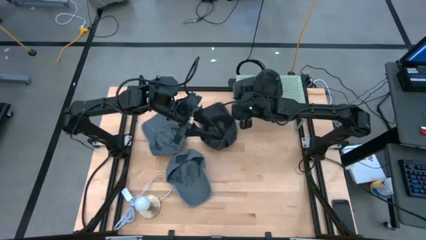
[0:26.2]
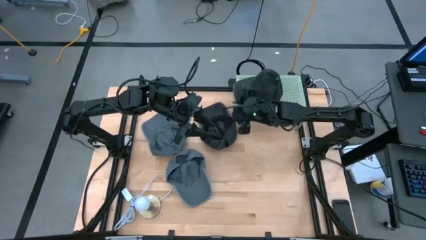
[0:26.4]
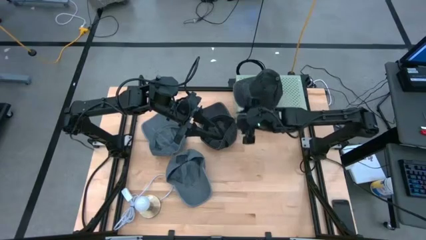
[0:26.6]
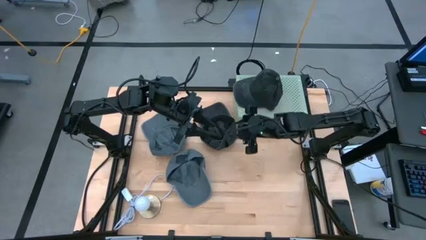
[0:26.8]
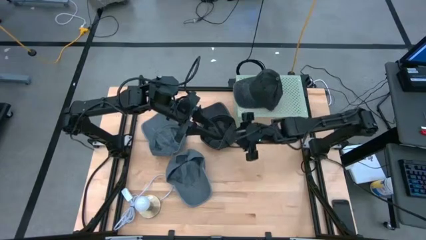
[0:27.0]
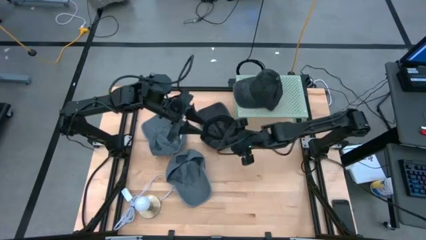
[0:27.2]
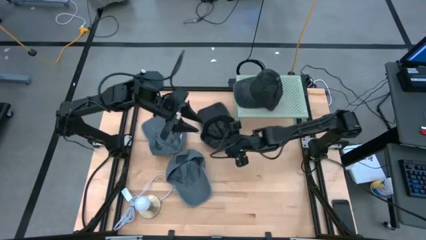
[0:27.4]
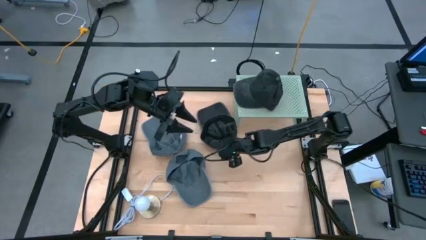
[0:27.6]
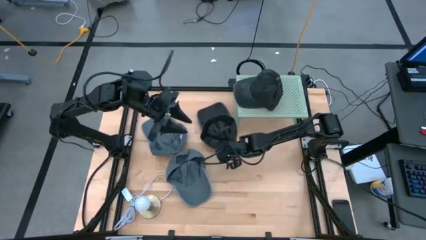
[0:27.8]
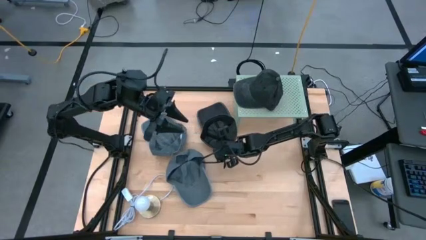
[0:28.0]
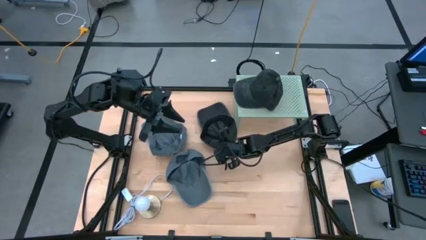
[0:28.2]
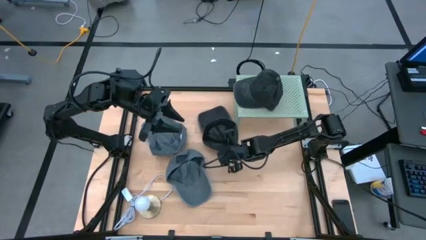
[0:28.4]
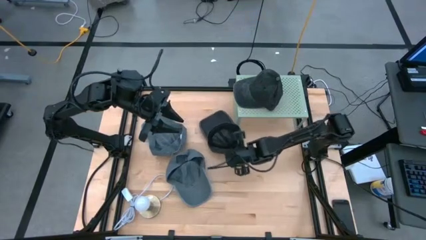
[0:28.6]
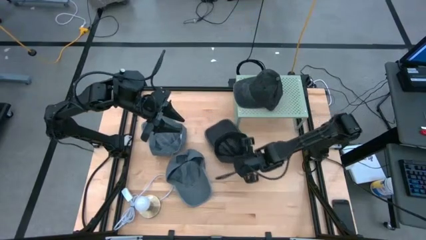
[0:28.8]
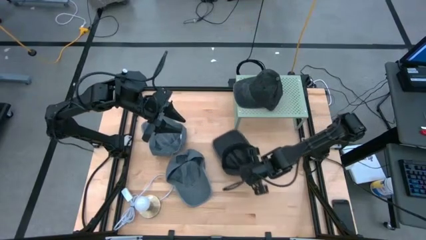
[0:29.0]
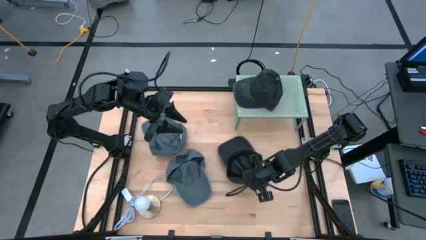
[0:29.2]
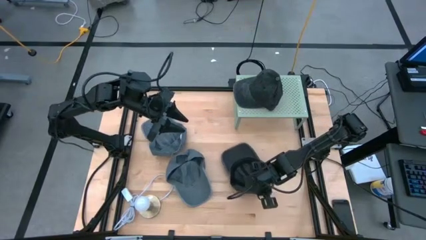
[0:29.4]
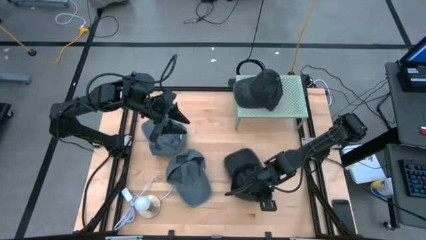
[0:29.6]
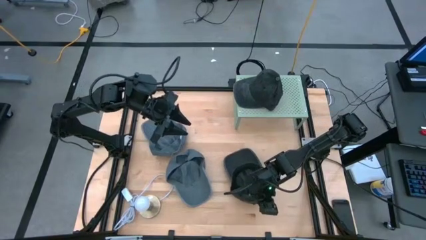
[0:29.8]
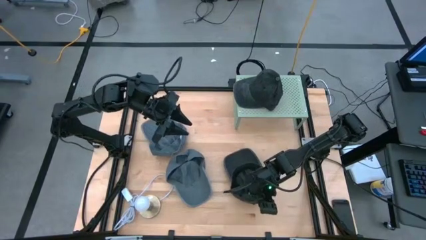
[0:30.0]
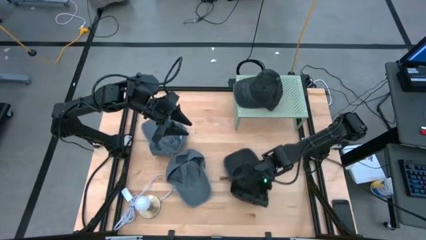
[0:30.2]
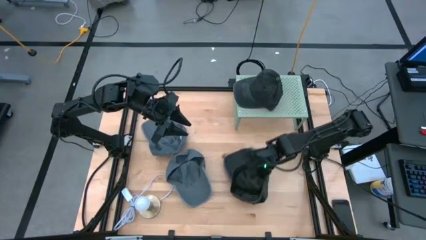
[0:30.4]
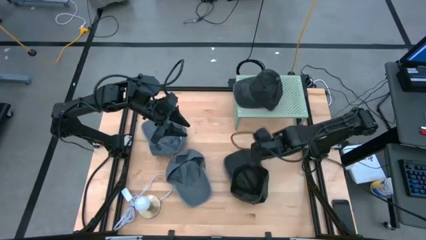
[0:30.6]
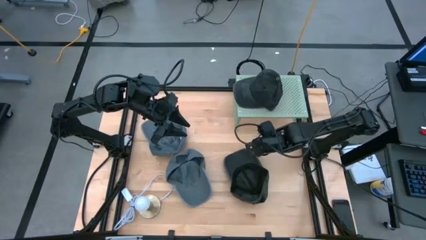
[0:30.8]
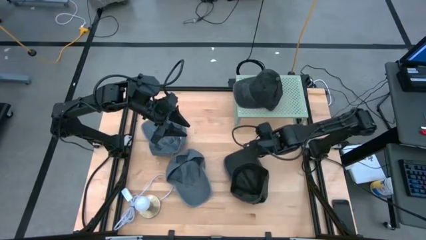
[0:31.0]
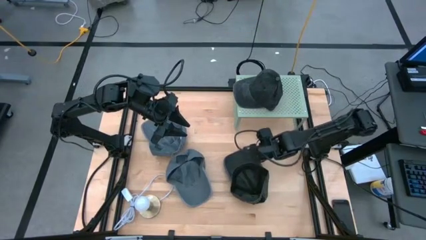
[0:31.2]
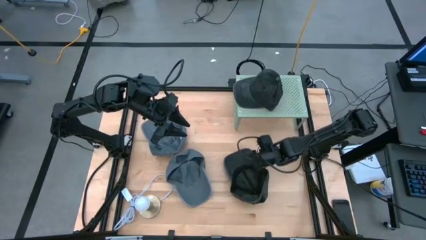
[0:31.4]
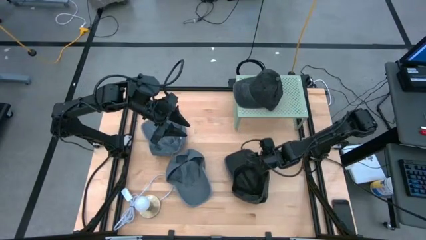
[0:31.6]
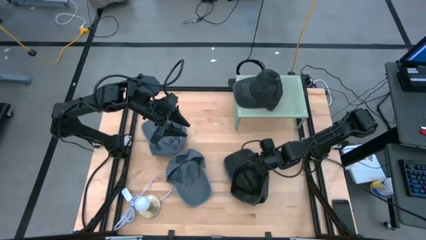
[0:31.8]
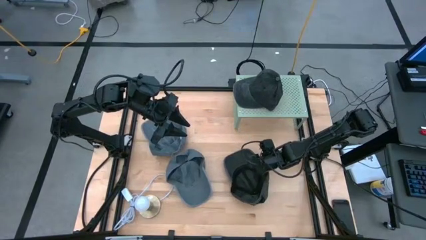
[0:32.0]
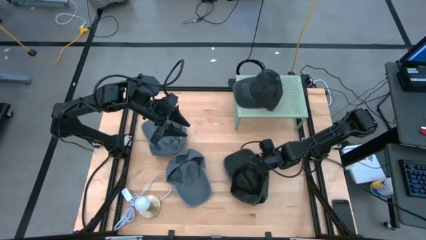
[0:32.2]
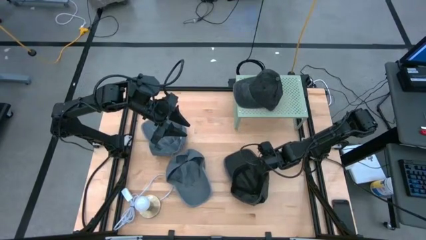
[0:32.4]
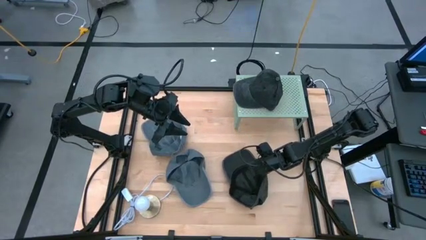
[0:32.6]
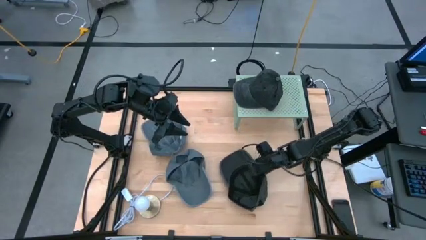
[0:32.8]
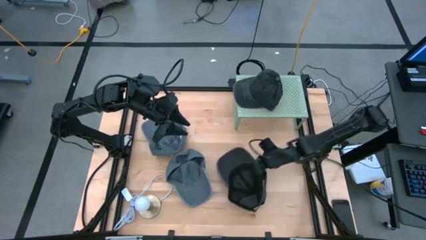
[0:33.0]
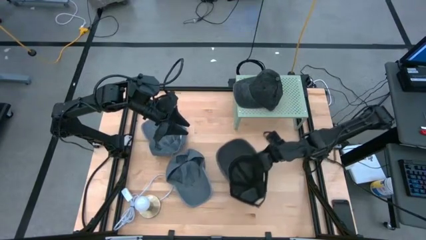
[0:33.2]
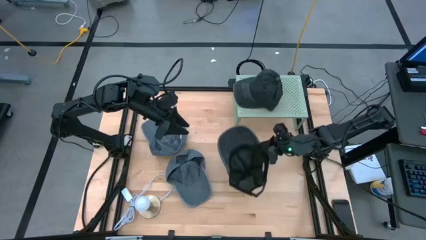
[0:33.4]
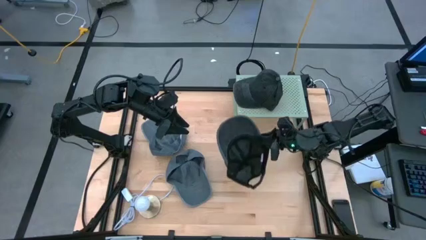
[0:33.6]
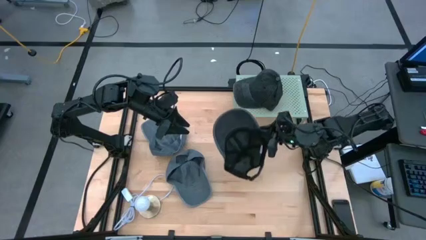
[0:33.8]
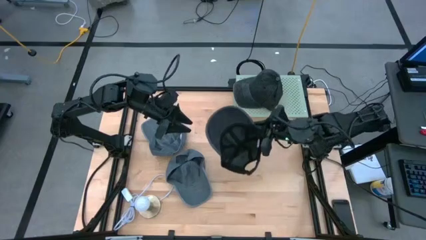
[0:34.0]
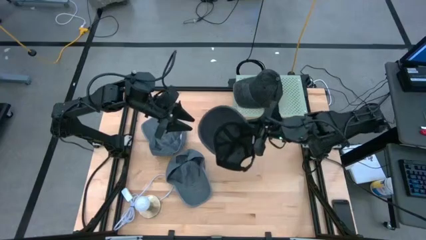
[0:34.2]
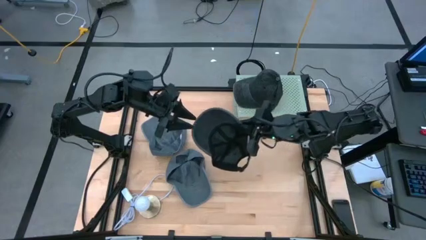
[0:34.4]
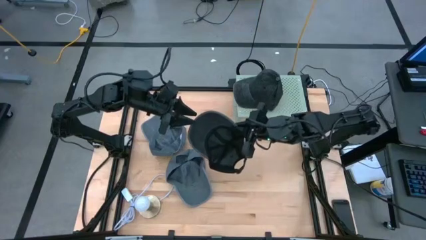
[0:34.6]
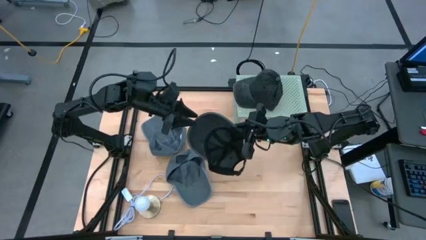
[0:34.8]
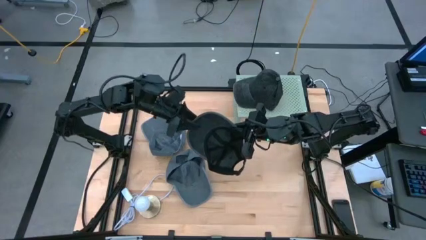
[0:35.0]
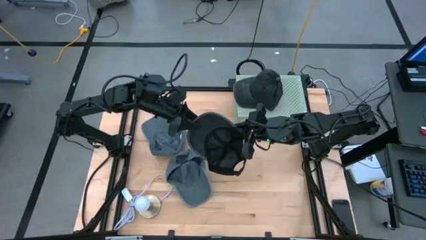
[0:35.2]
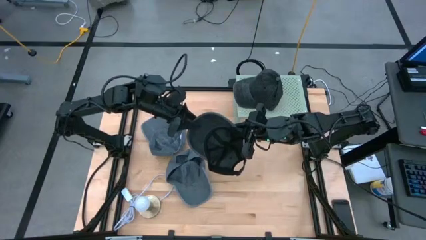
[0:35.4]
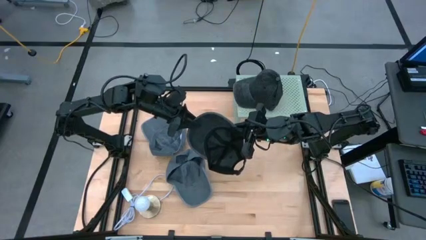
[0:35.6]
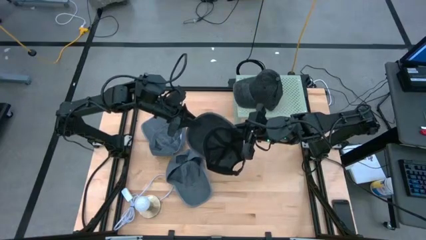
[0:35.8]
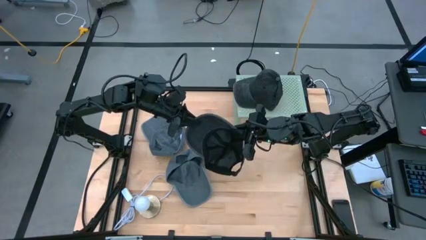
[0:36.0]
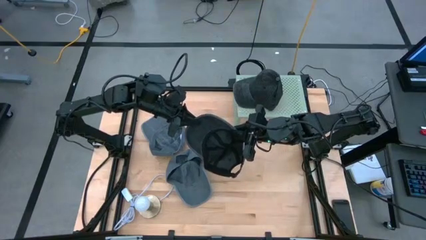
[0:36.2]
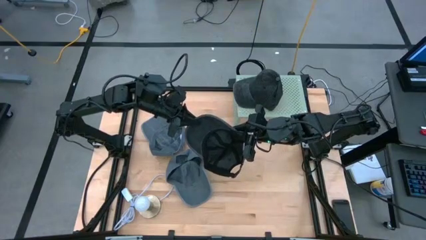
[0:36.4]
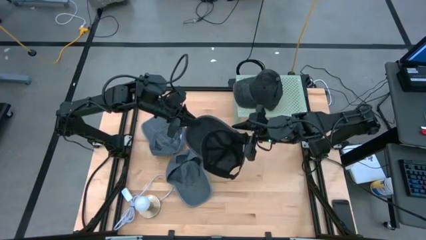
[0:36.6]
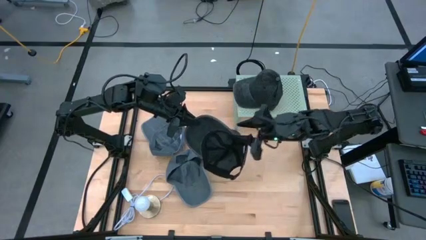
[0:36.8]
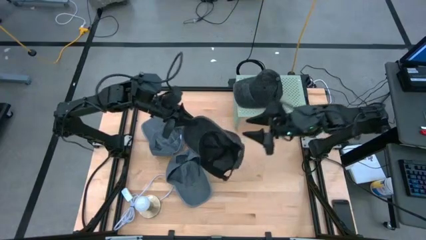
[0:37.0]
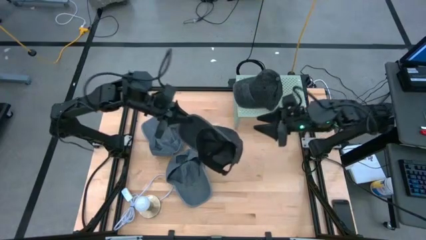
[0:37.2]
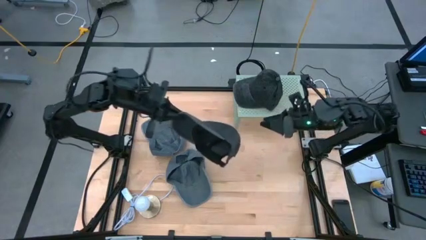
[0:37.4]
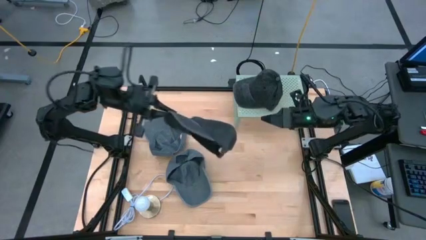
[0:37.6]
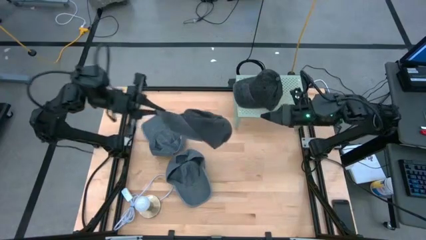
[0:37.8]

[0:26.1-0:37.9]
Task: Pick & Place hat
Stack the black cap on the black cap on the shelf
